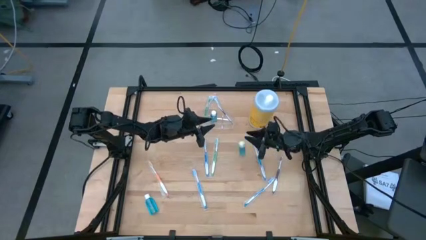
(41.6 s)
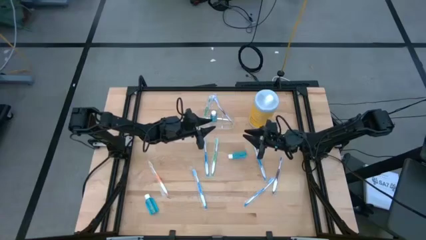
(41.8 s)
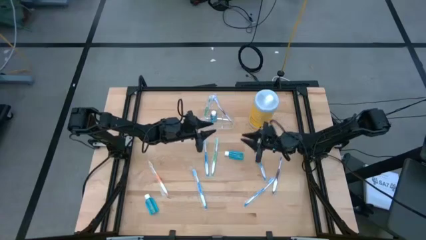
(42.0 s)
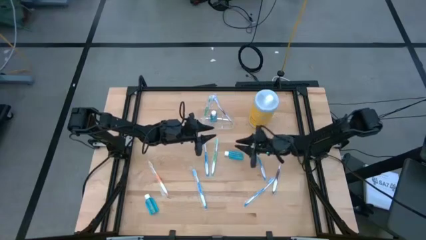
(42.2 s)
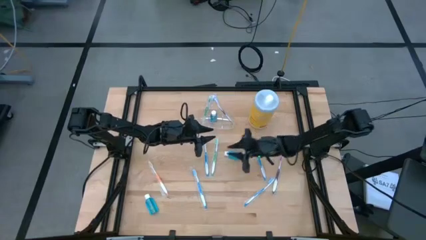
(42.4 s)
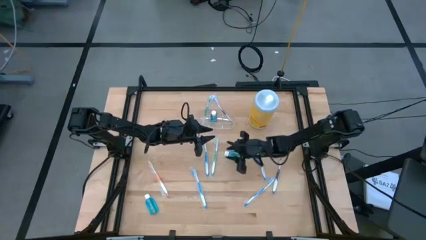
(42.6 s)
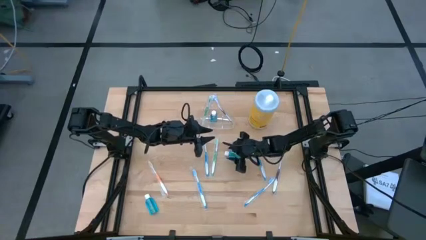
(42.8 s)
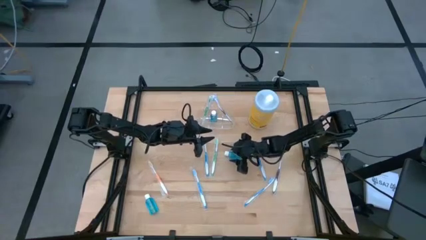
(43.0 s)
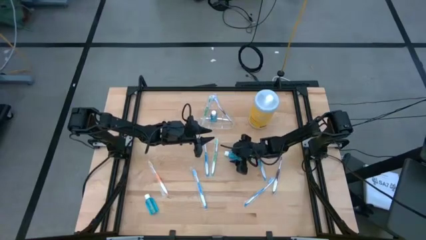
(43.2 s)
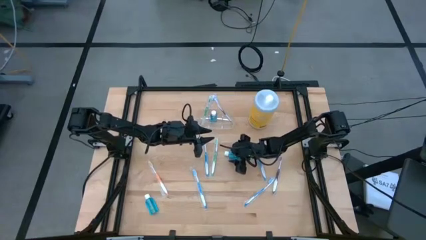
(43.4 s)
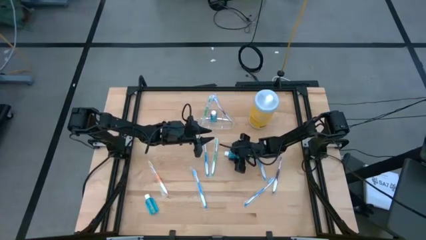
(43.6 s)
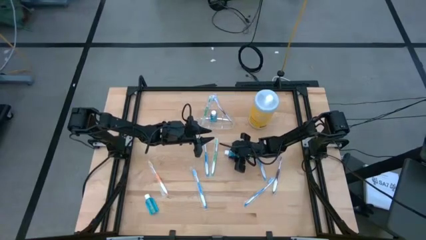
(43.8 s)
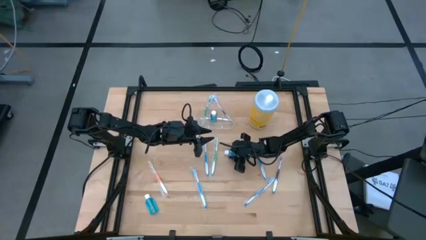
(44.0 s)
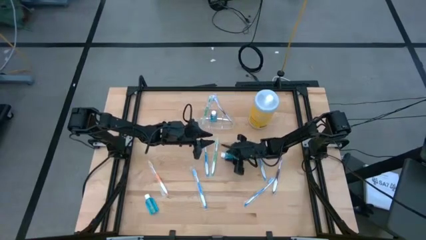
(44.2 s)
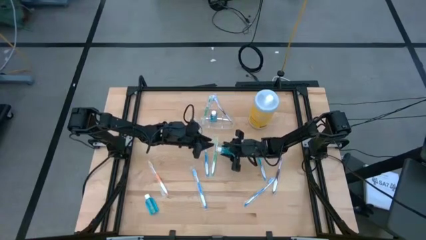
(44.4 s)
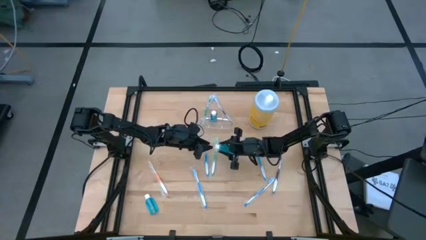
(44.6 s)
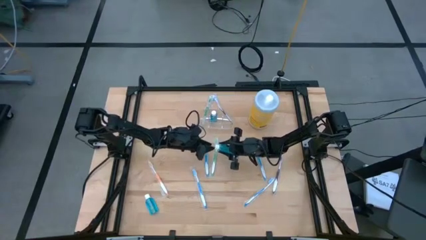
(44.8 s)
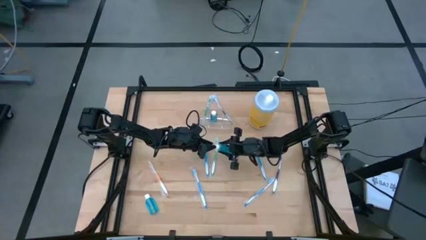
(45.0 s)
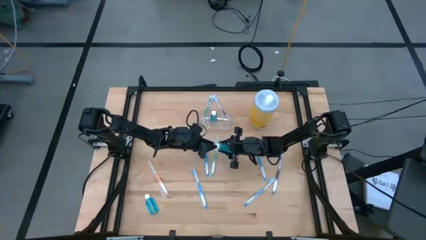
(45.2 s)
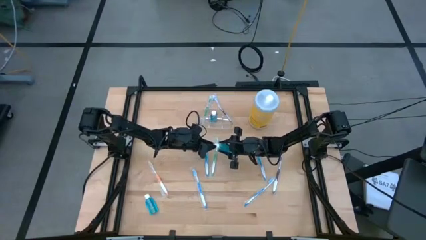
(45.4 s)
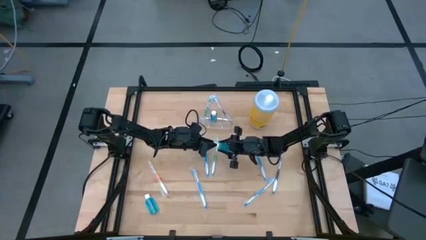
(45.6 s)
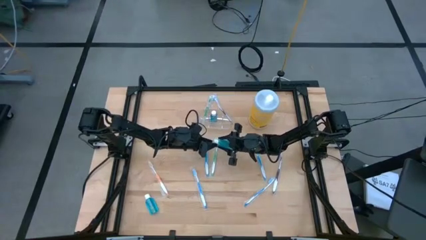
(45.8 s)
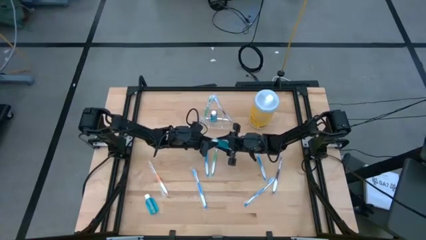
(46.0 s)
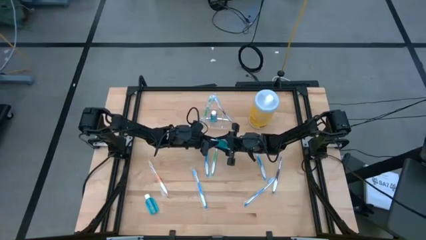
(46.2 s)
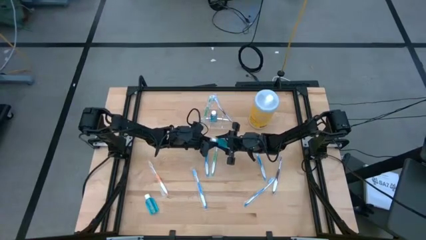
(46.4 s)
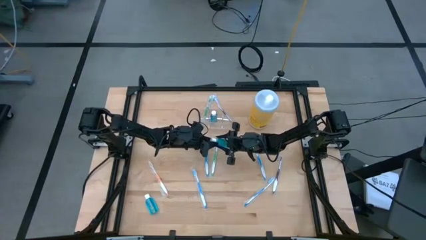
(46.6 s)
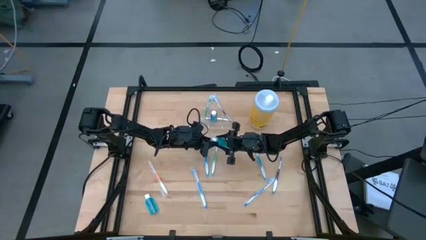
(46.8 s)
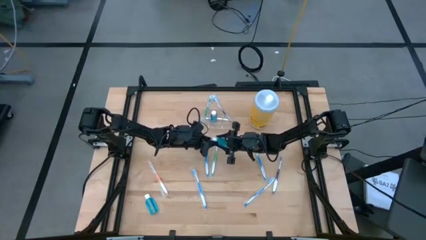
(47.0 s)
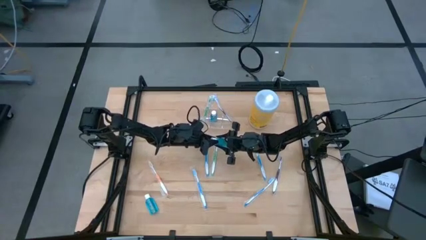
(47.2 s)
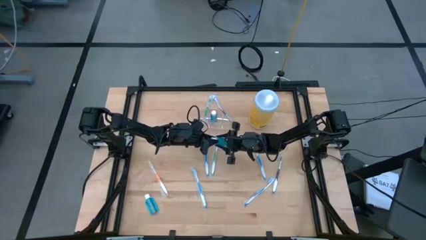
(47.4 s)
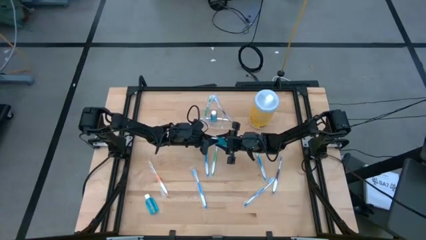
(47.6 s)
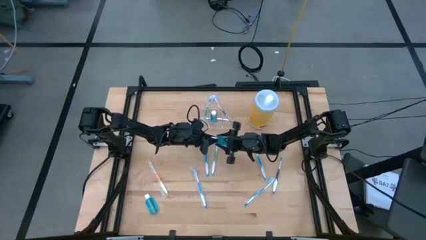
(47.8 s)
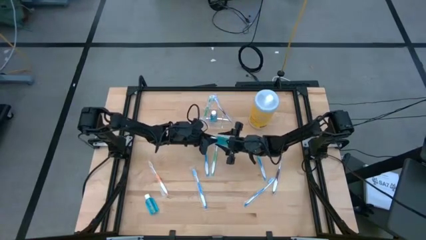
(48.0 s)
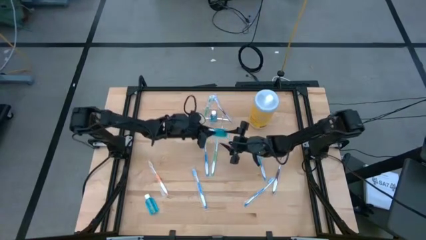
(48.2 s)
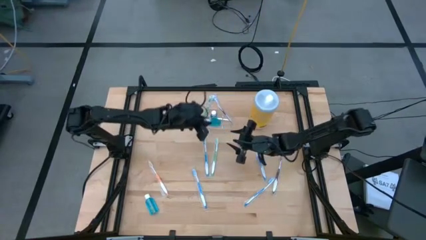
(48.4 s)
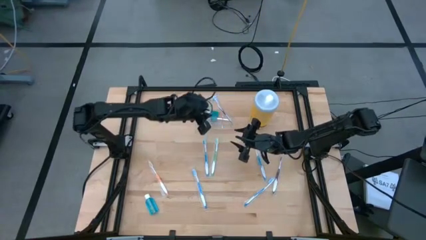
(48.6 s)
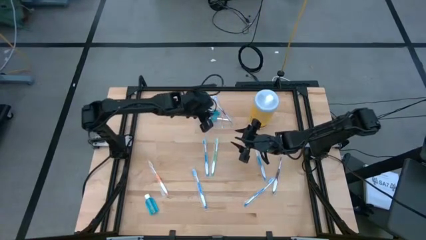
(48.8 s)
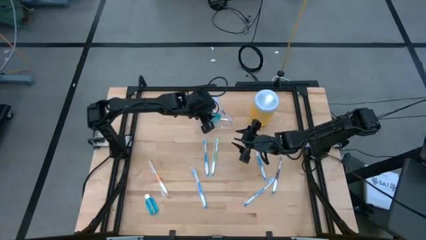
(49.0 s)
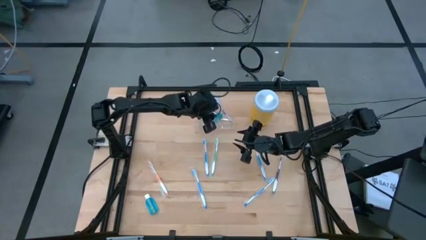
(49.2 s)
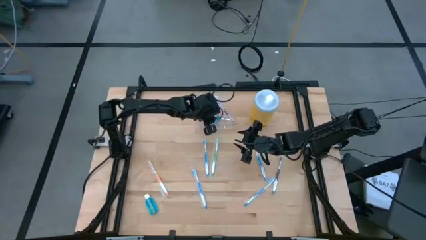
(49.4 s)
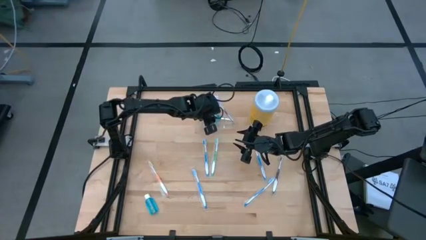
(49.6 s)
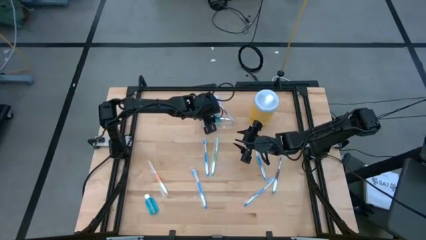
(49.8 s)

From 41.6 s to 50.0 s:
Task: Pick & Place toothbrushing station
Put the blue mouthwash into the middle compartment of the transparent organizer

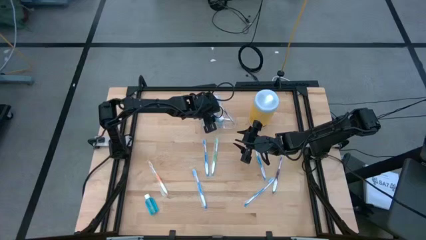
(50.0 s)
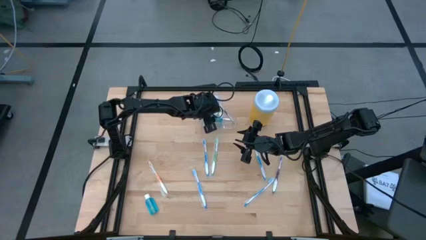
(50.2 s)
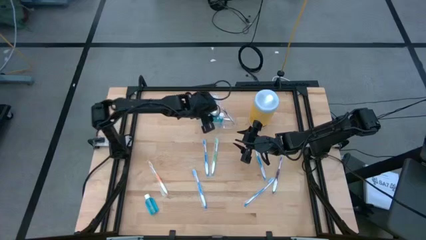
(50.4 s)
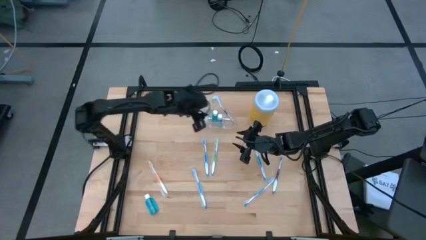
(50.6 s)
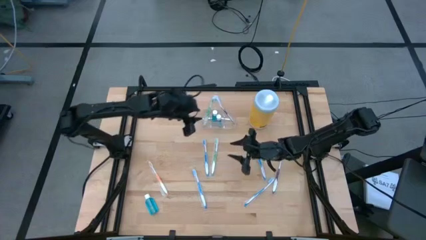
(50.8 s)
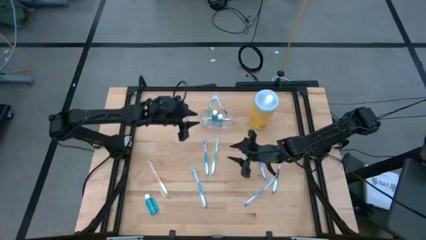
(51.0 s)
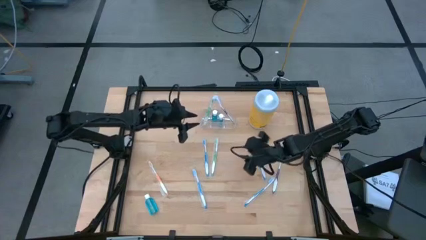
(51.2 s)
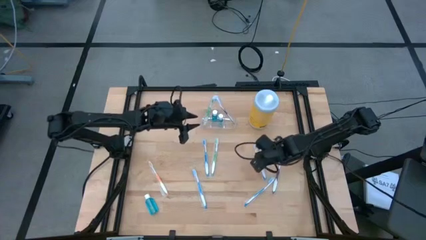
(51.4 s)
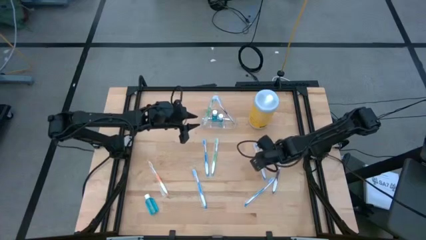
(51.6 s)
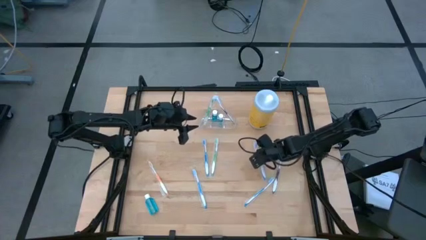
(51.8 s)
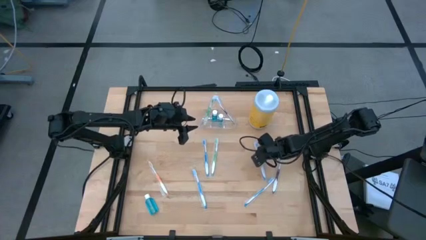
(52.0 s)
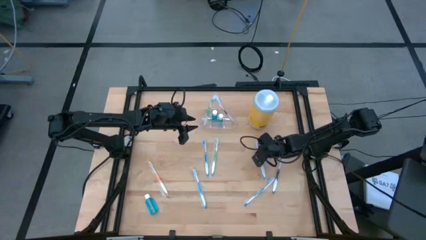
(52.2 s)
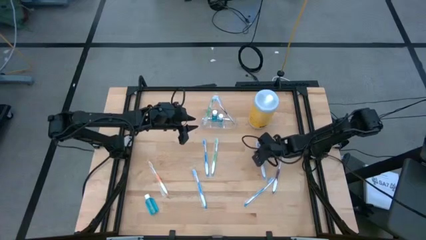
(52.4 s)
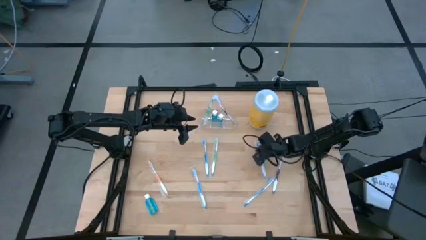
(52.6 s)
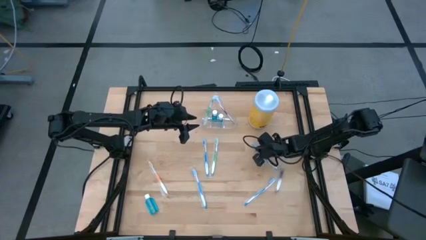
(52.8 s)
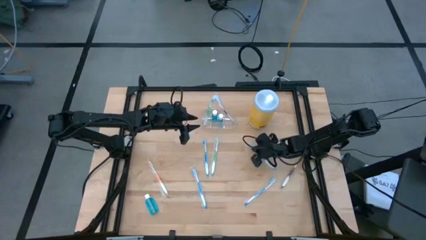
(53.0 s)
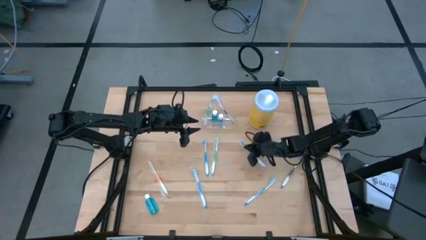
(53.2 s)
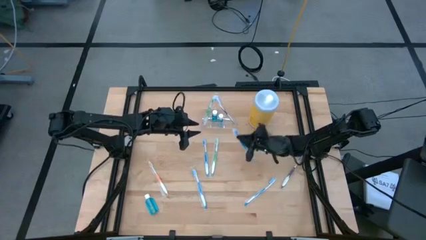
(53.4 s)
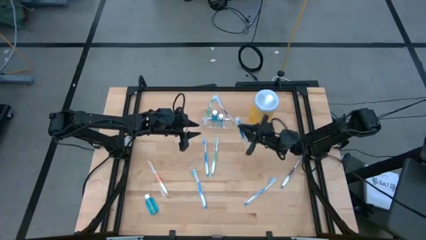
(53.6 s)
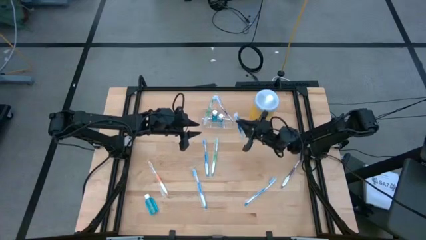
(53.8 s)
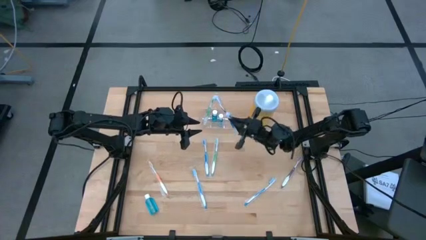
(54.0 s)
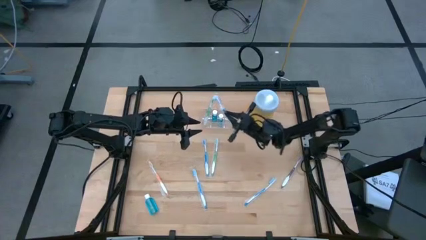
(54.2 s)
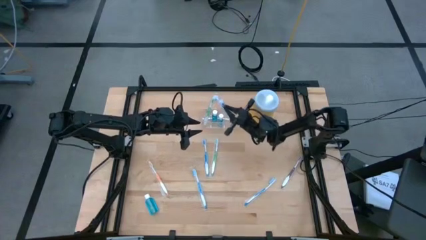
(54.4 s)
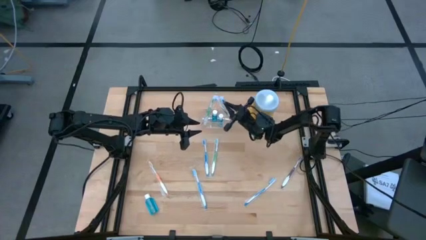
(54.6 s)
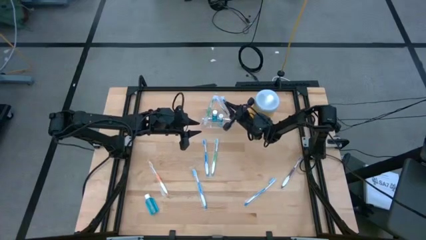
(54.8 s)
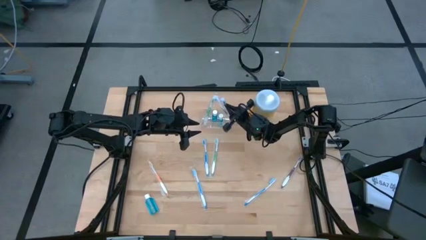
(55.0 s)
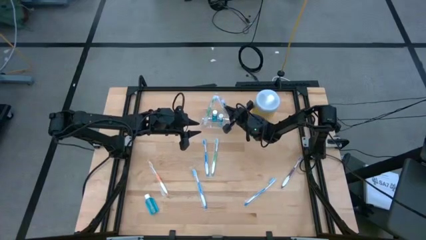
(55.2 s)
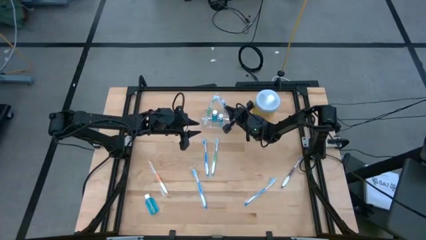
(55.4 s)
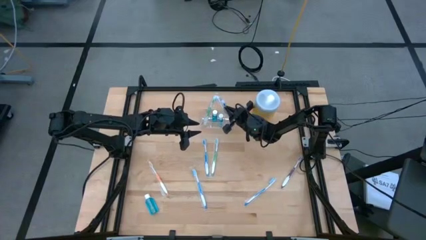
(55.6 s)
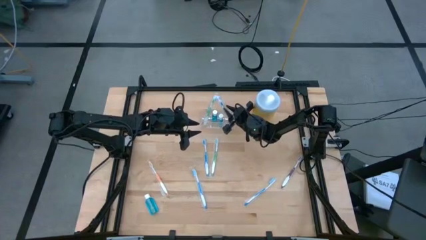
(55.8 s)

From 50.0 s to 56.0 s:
Put the blue toothbrush into the right compartment of the transparent organizer

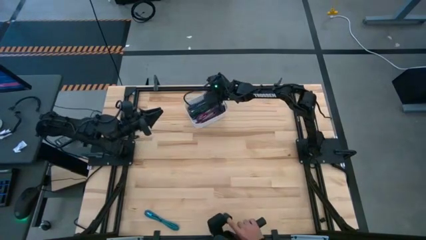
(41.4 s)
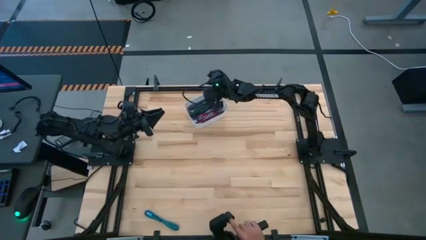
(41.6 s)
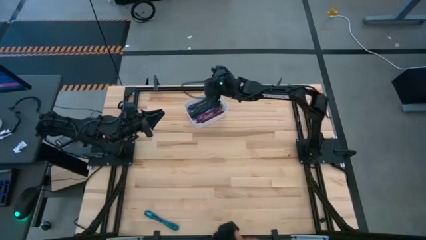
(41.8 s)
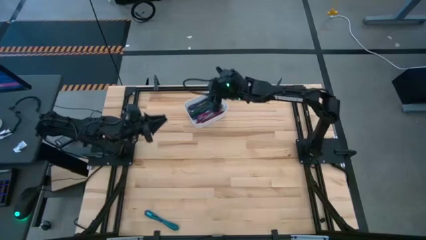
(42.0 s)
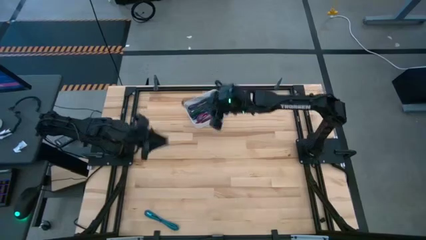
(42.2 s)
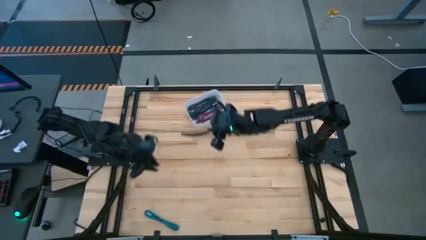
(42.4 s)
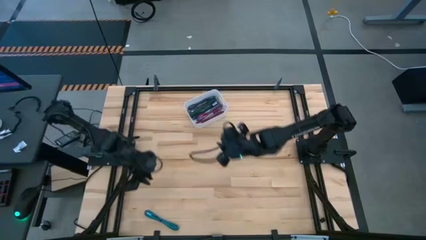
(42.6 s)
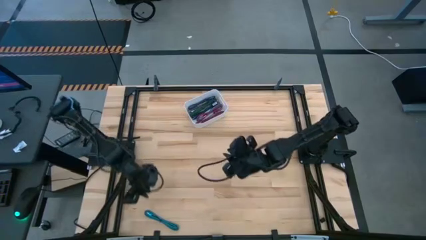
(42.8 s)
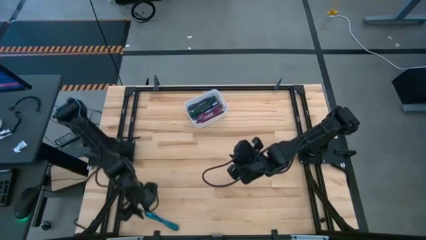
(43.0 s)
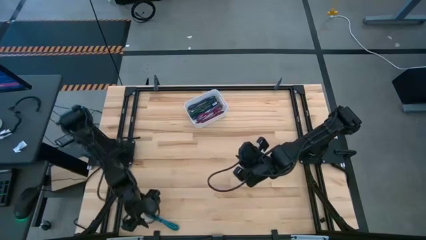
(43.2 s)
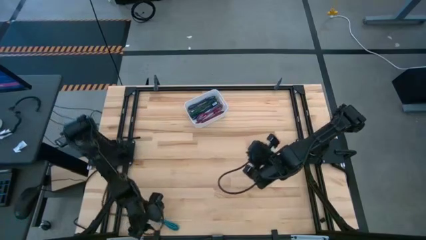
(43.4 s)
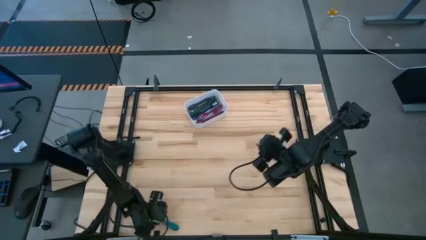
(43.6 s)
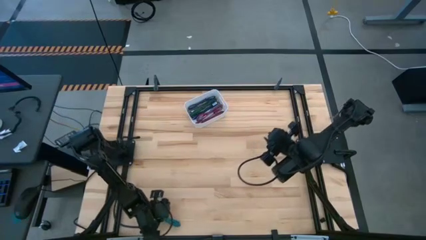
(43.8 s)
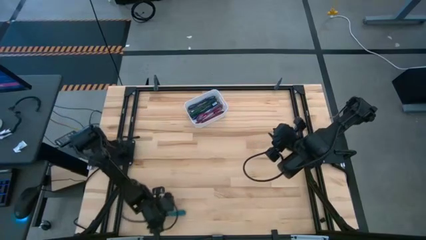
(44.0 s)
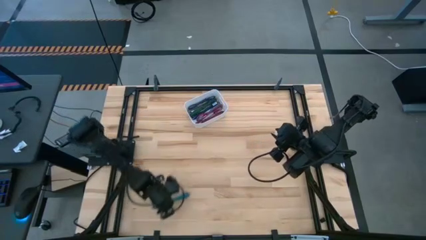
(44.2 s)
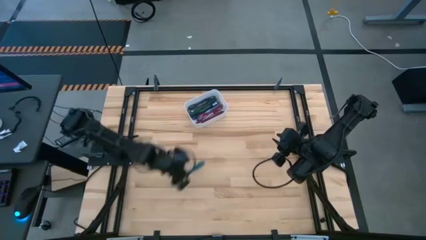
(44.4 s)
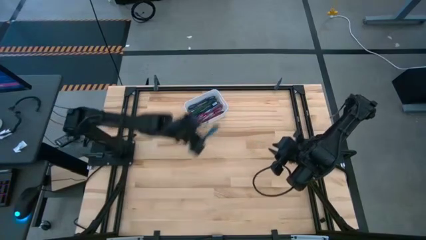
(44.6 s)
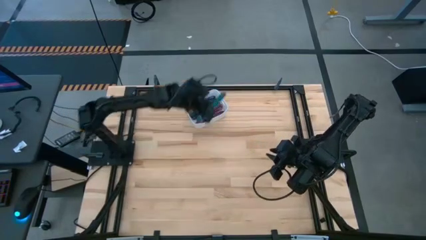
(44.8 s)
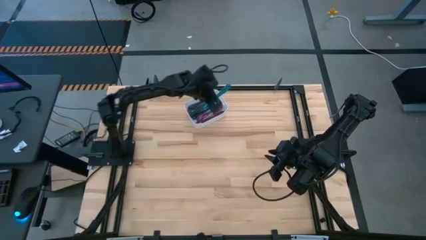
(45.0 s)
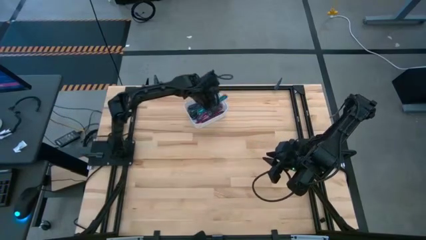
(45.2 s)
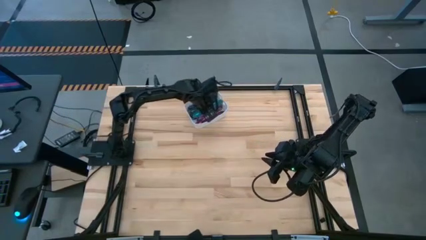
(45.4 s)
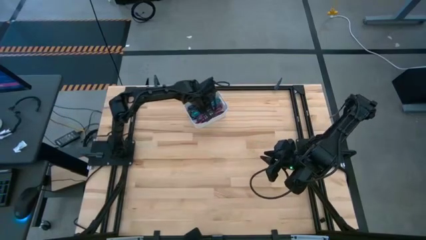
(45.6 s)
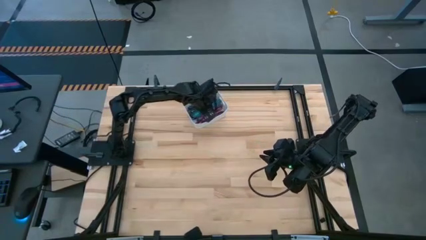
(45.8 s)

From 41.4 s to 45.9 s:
Task: Pick and place USB-C Cables
Put the black blue charger cable into the white bin
